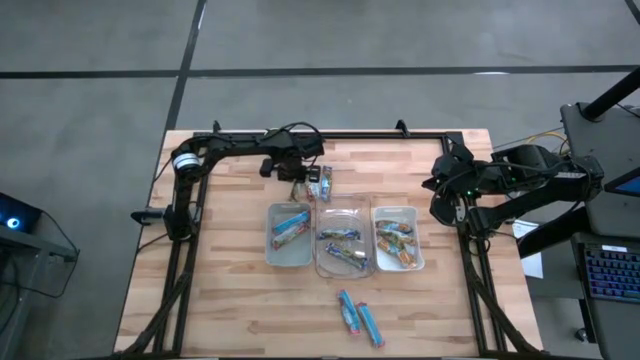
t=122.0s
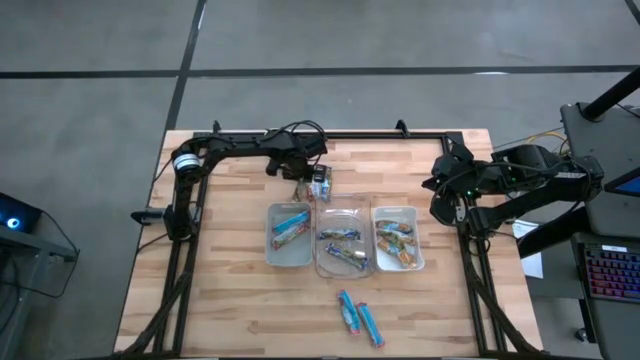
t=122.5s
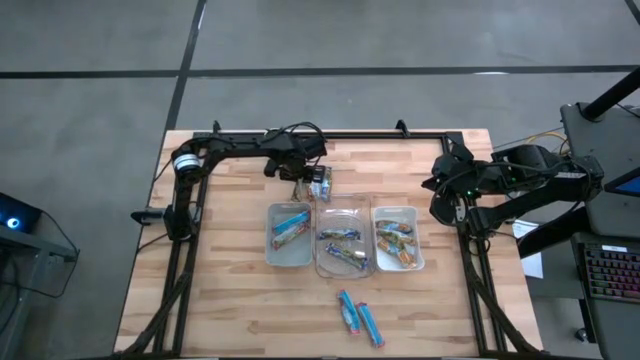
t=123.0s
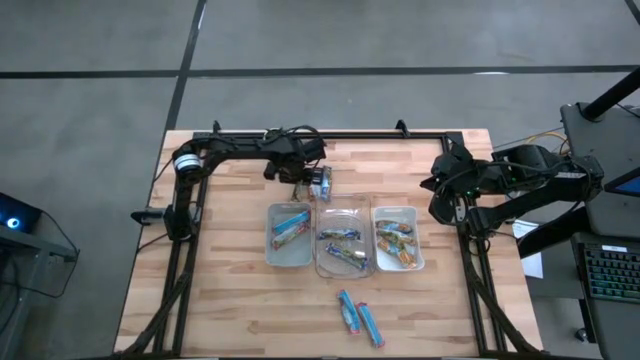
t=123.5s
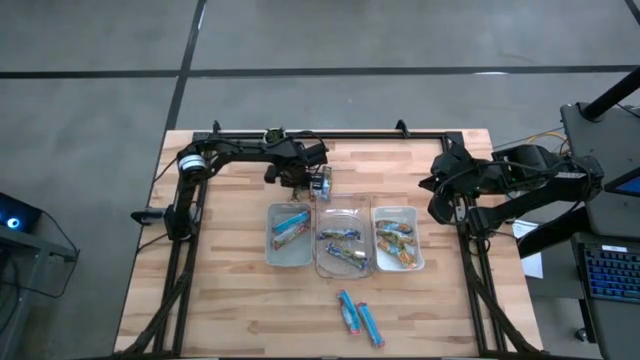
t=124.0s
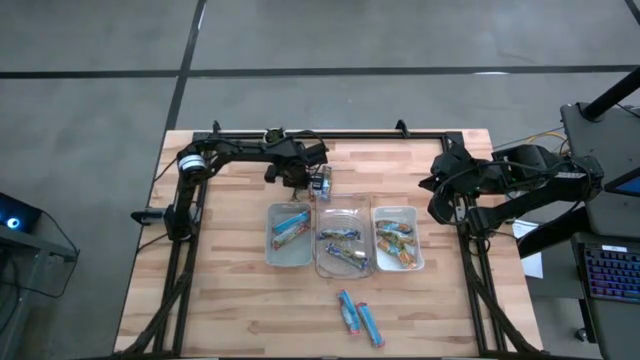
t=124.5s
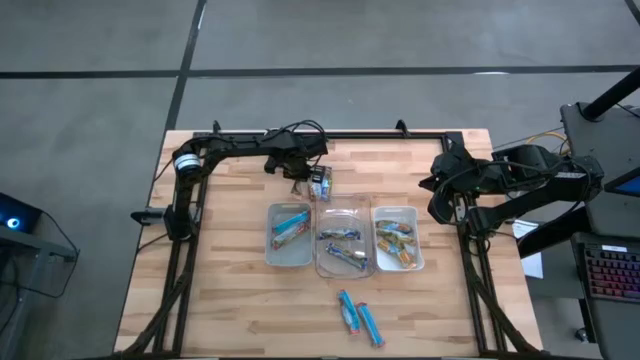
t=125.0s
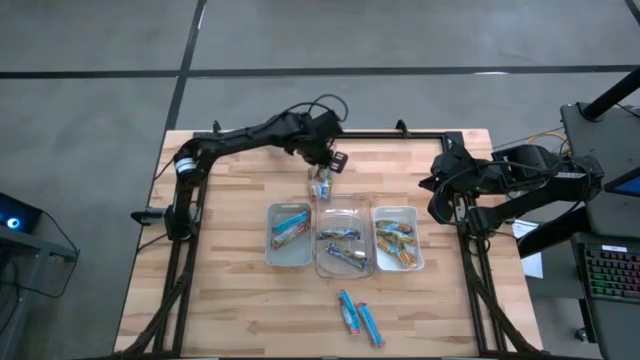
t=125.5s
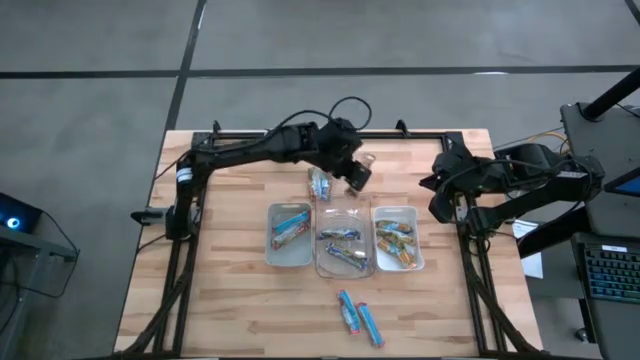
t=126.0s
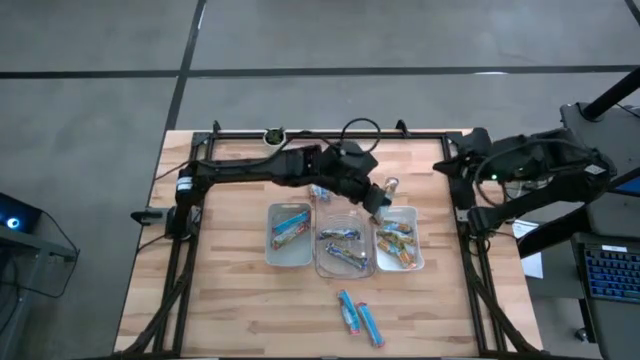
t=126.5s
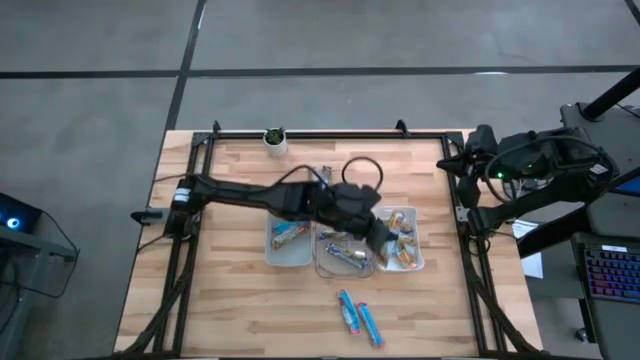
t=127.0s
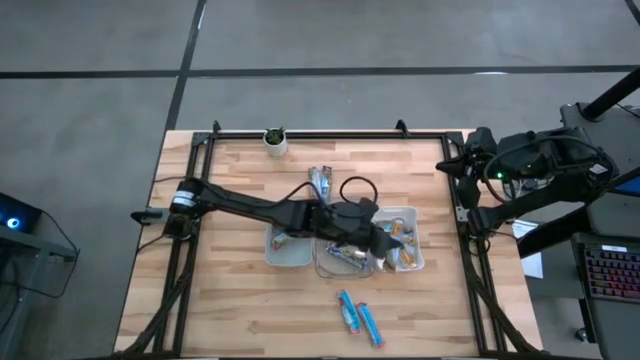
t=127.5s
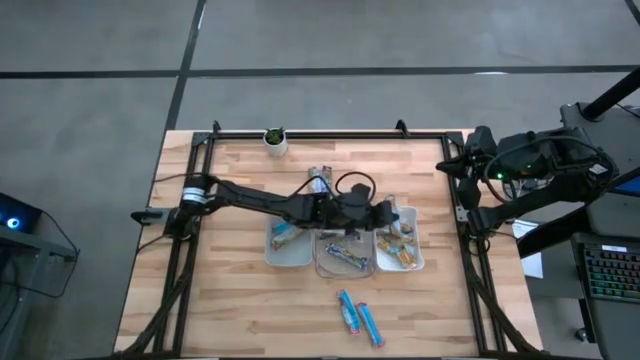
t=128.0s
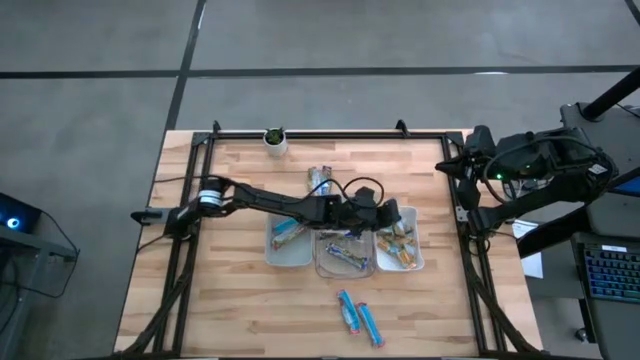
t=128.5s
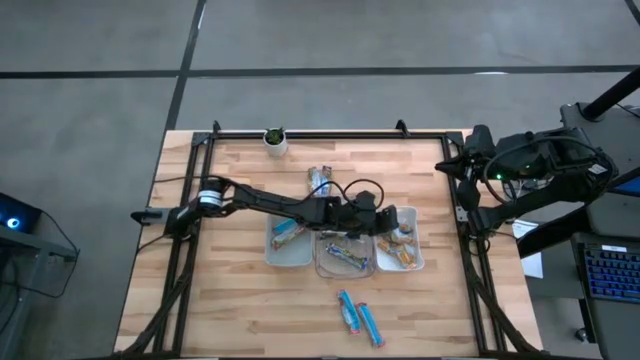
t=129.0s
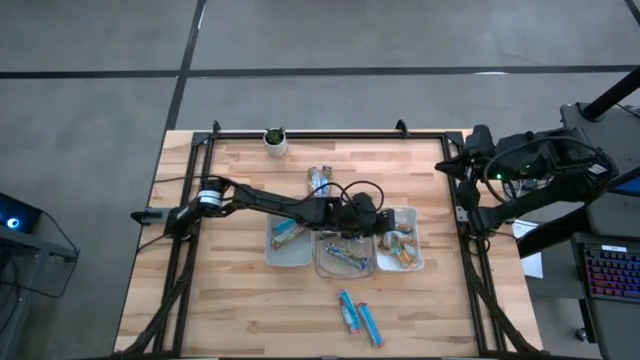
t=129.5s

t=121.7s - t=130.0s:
Task: Pick and place Granola Bars by type
Put the yellow granola bar into the white bin

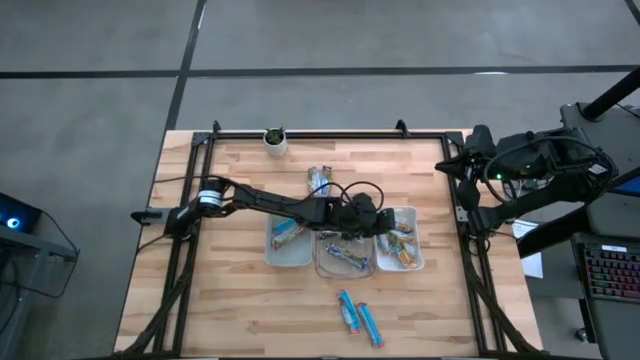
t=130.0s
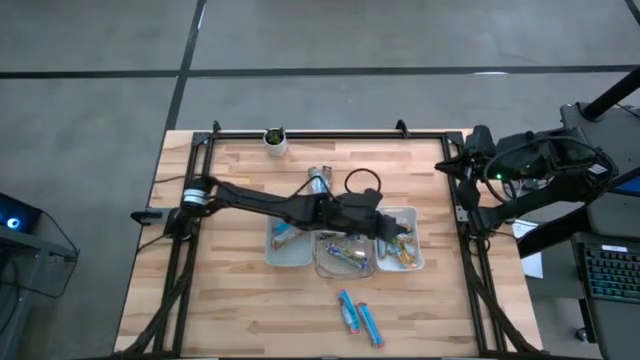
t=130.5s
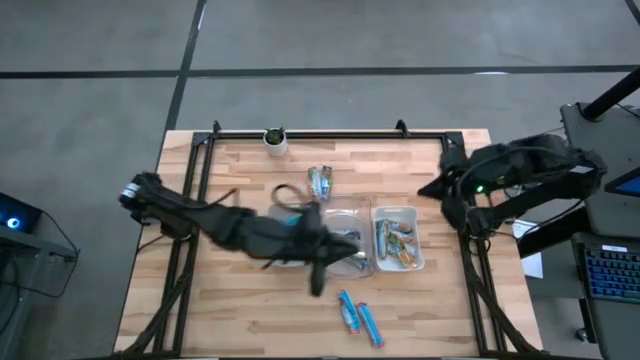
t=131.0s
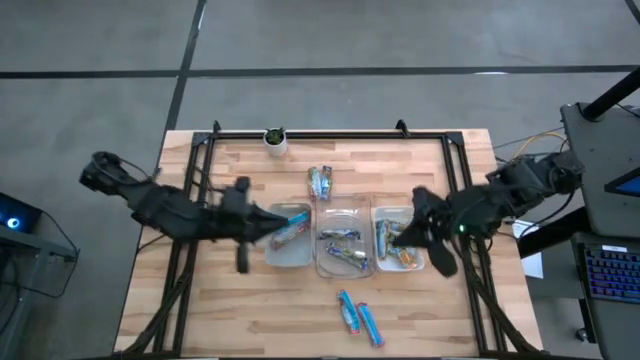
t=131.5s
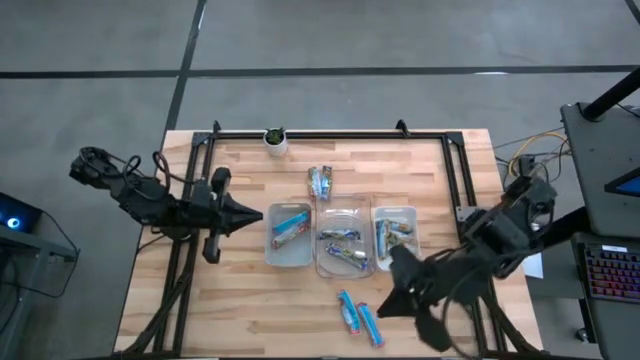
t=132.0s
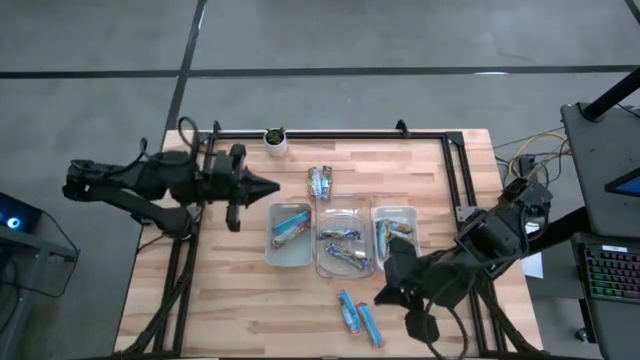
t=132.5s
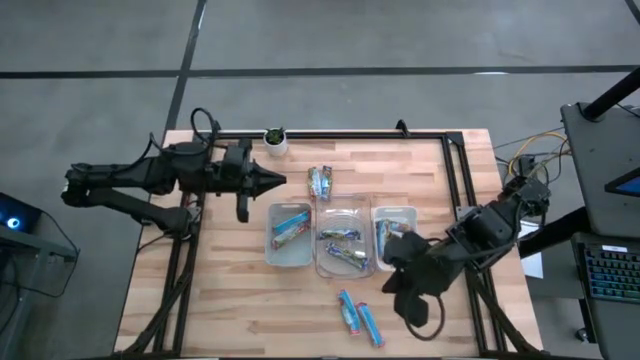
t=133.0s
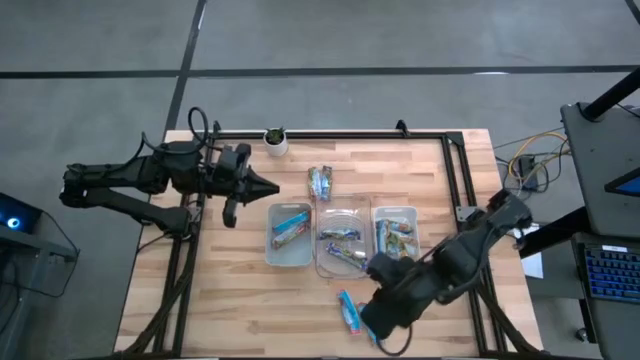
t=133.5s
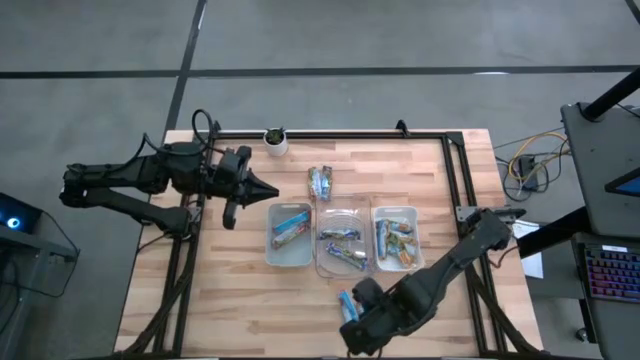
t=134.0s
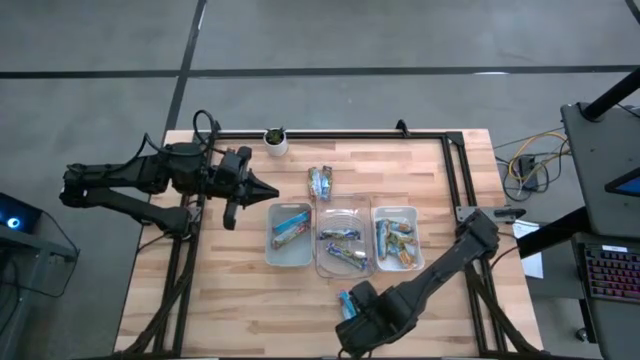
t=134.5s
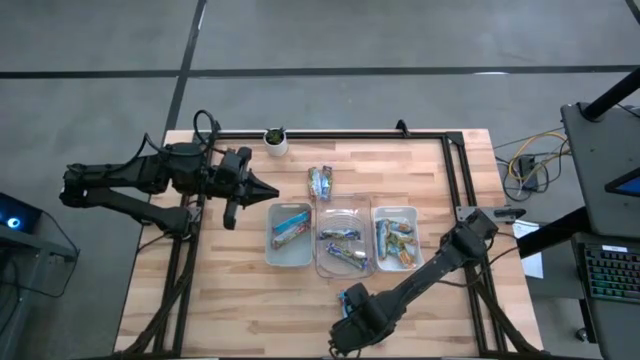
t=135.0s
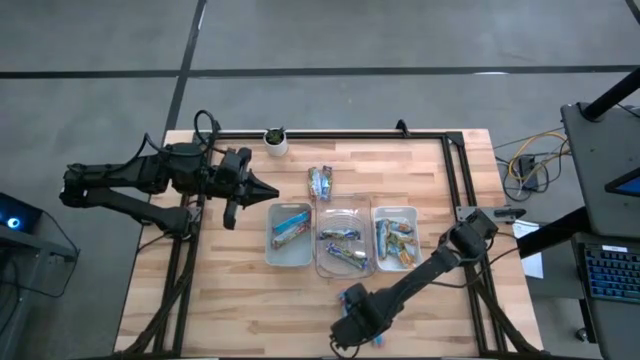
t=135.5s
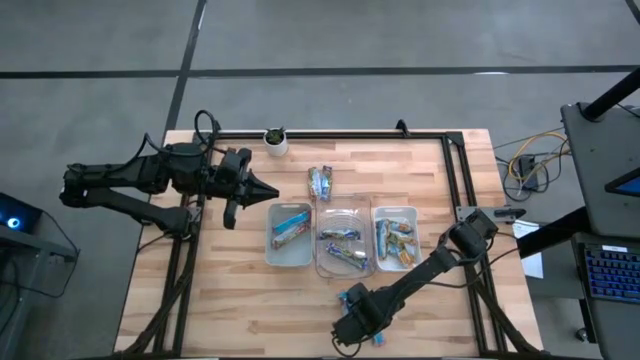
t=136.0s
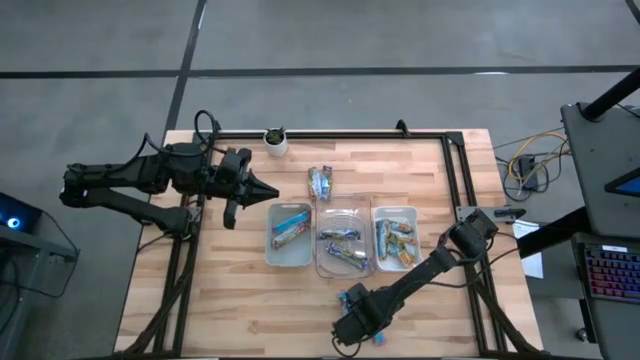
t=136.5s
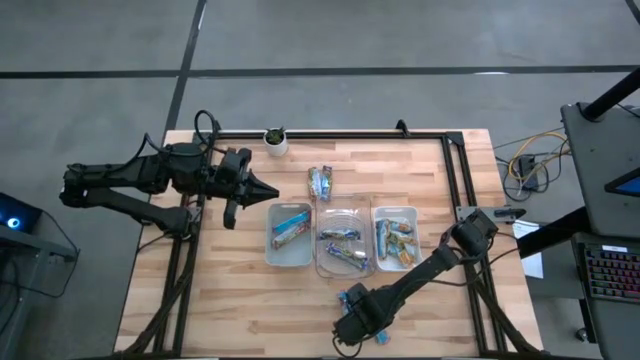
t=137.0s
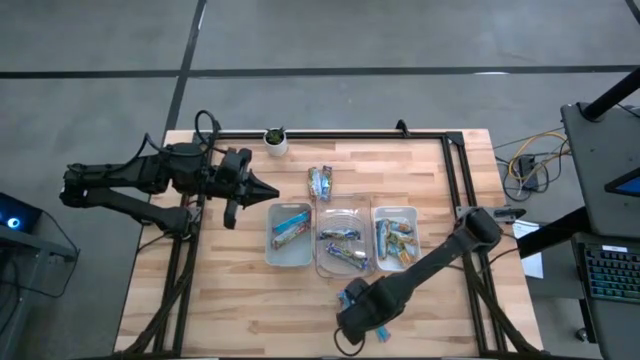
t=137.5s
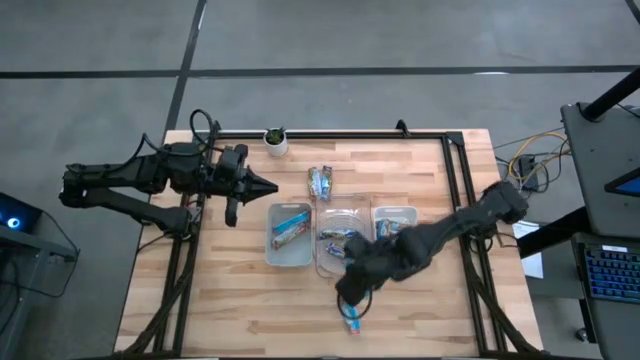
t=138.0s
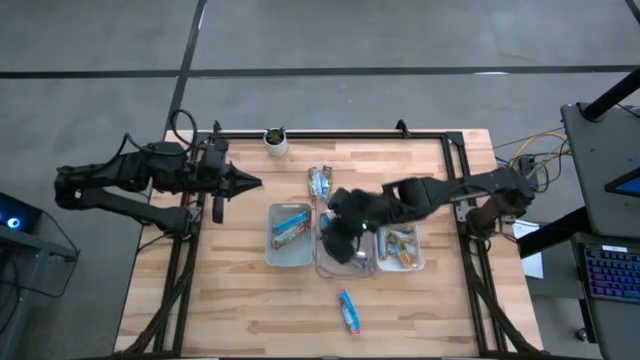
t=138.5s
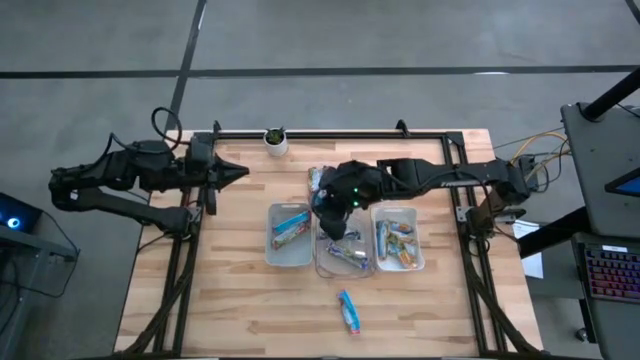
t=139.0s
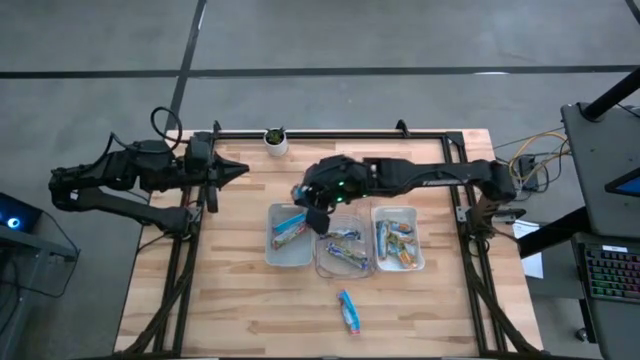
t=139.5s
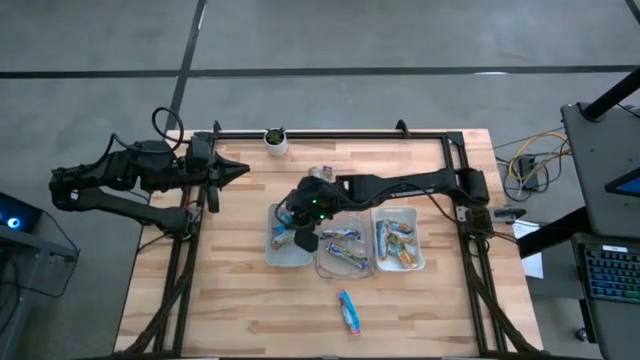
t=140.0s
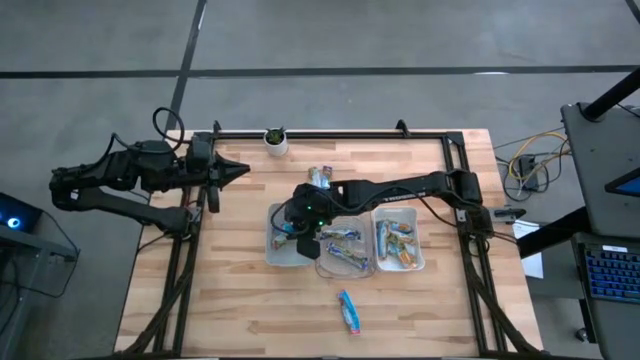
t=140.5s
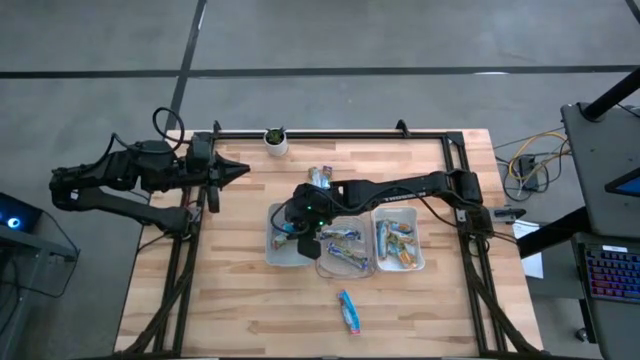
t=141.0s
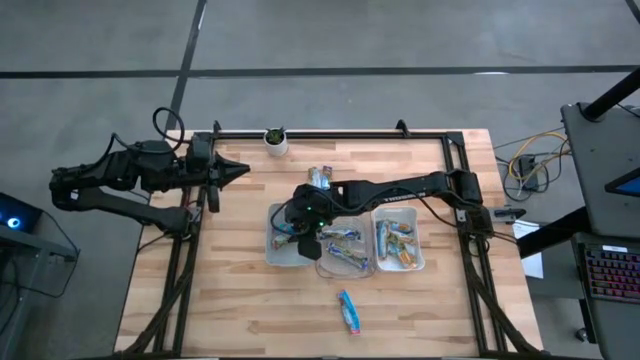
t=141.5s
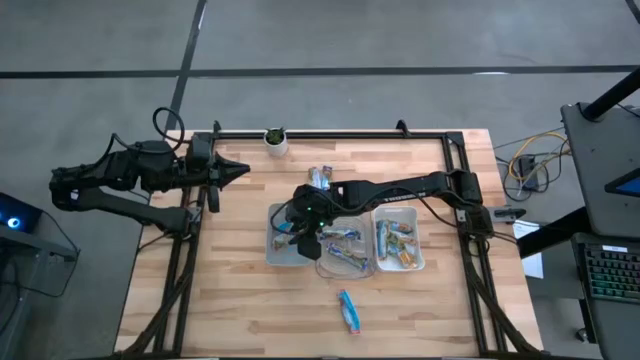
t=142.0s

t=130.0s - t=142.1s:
Put the right red granola bar into the gray bin

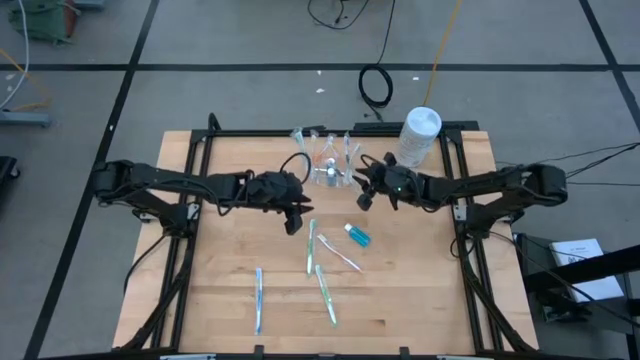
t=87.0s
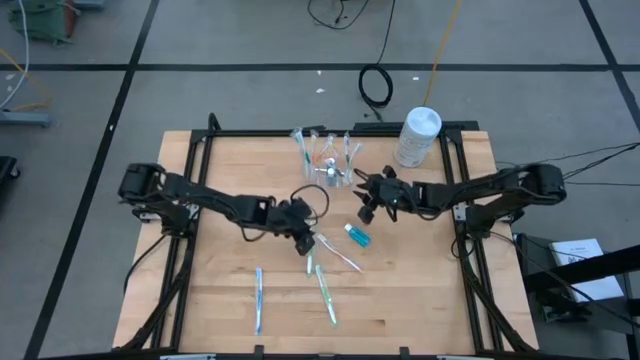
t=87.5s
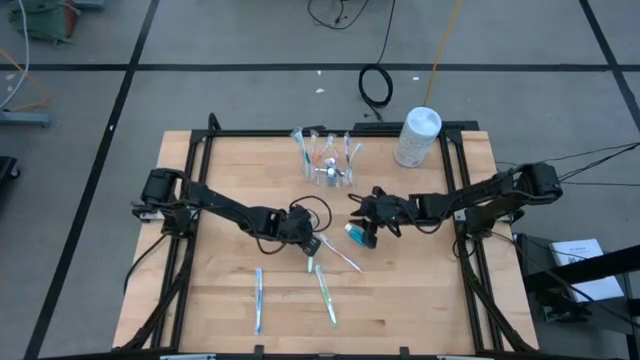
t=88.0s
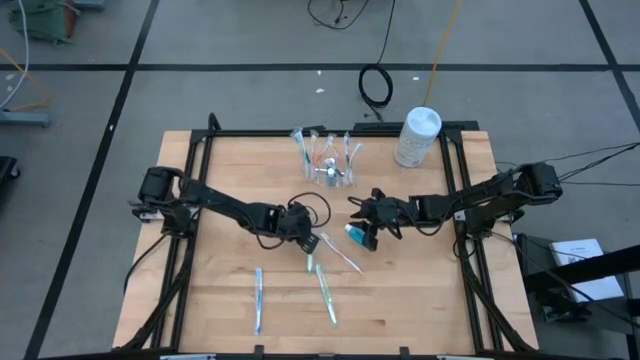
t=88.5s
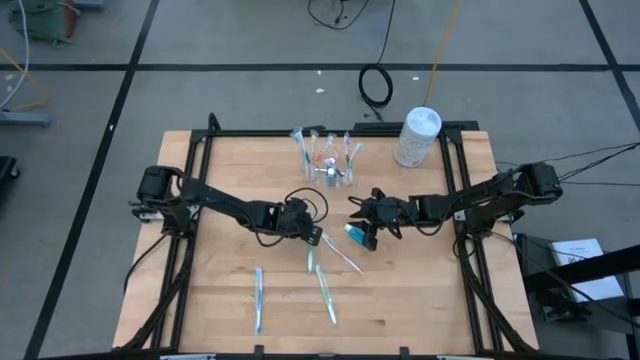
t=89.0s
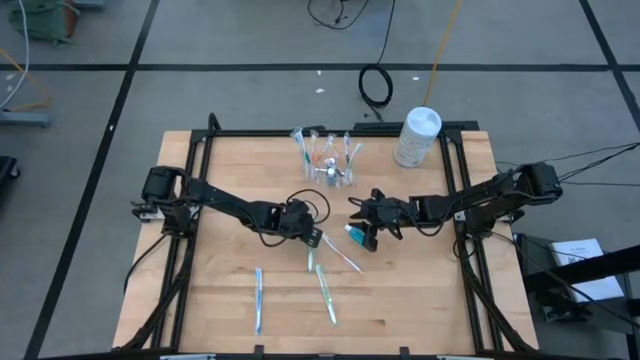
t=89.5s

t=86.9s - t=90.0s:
Task: Pick & Place toothbrushing station
Put the green toothbrush into the transparent organizer
